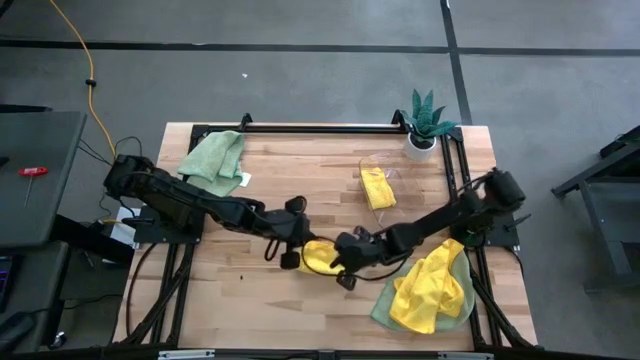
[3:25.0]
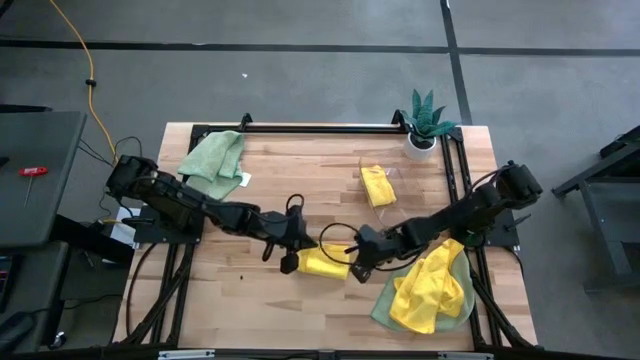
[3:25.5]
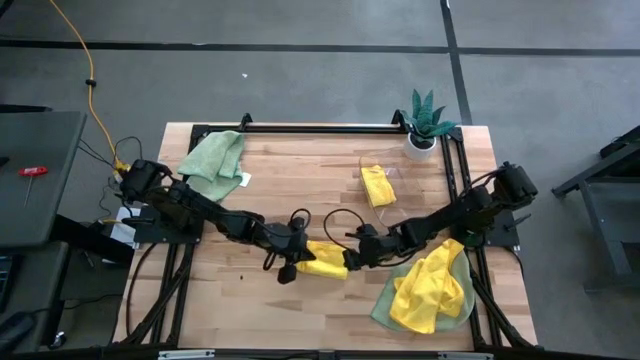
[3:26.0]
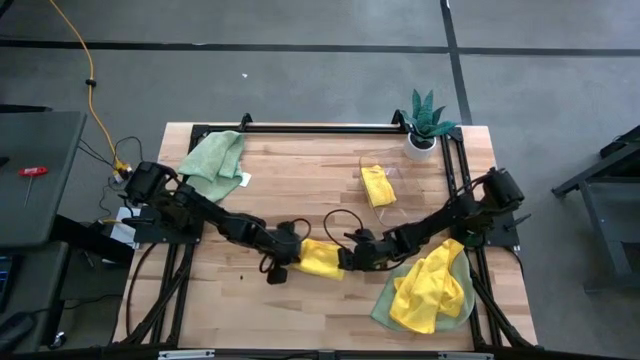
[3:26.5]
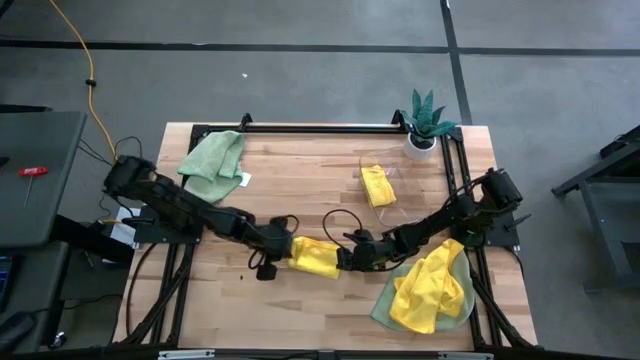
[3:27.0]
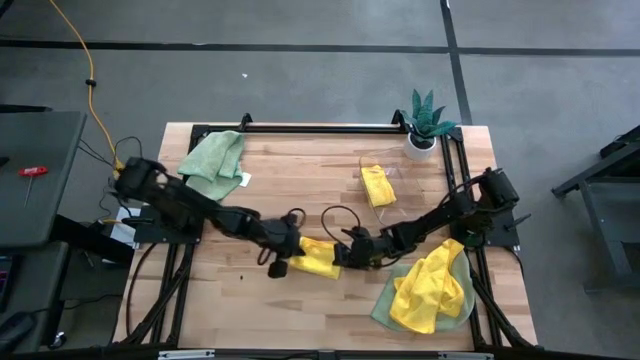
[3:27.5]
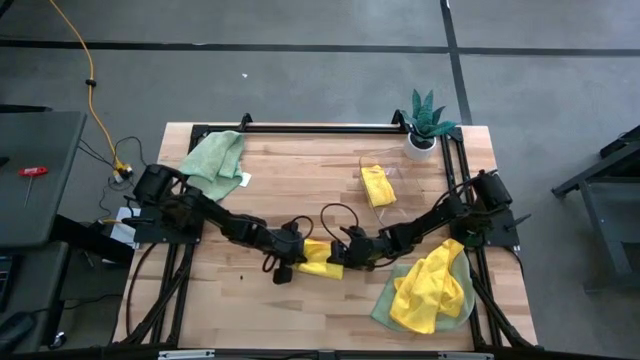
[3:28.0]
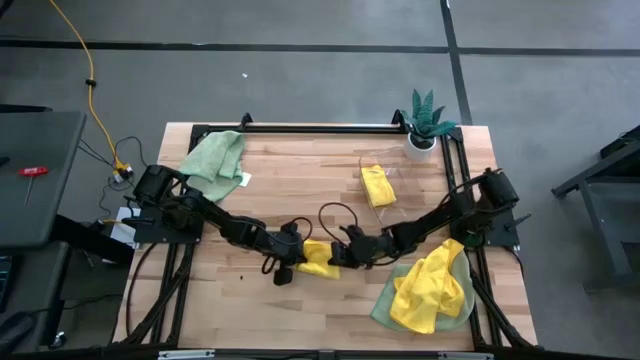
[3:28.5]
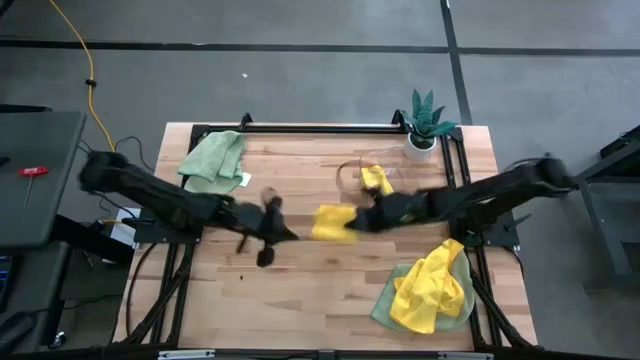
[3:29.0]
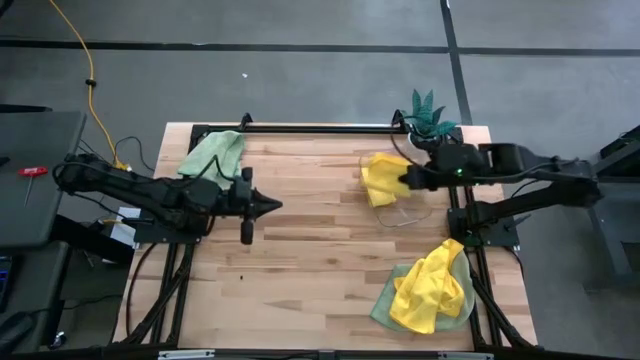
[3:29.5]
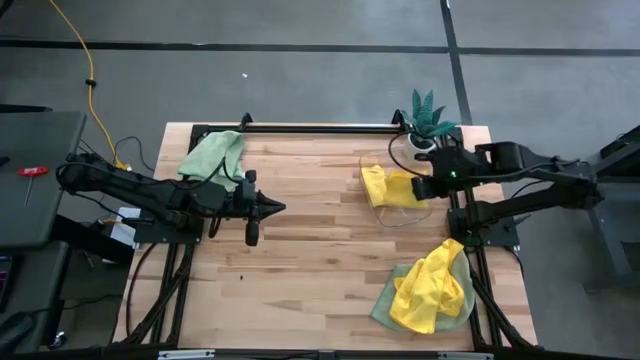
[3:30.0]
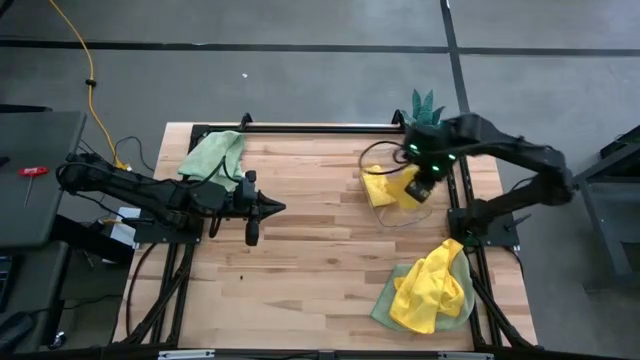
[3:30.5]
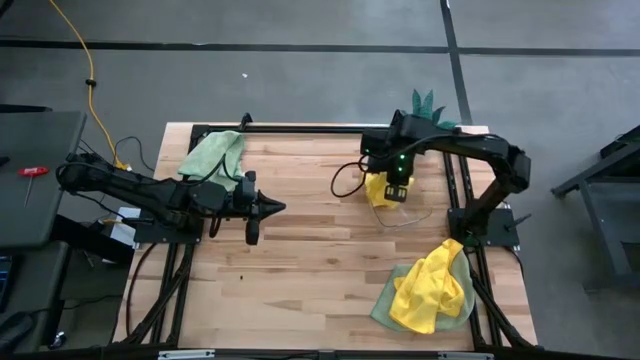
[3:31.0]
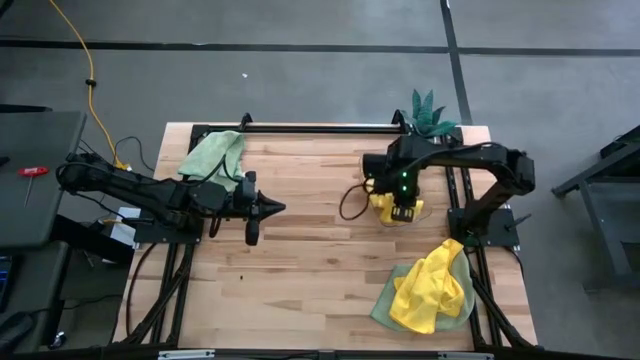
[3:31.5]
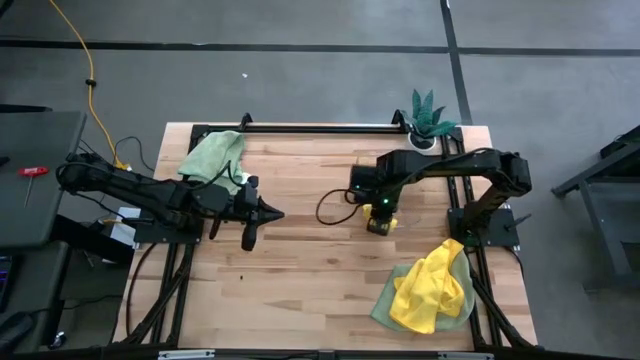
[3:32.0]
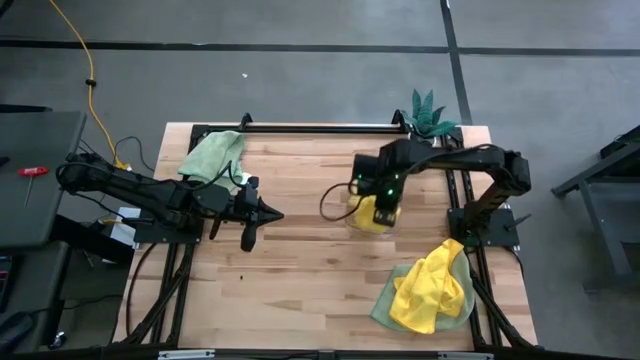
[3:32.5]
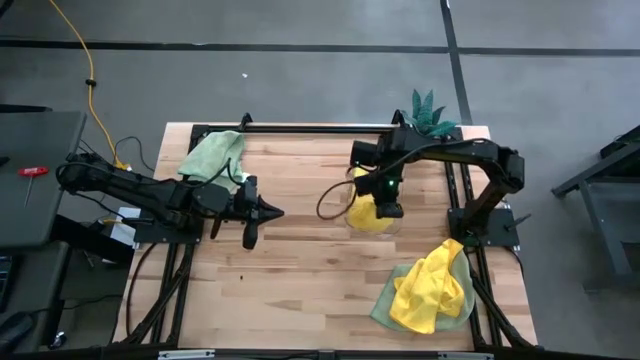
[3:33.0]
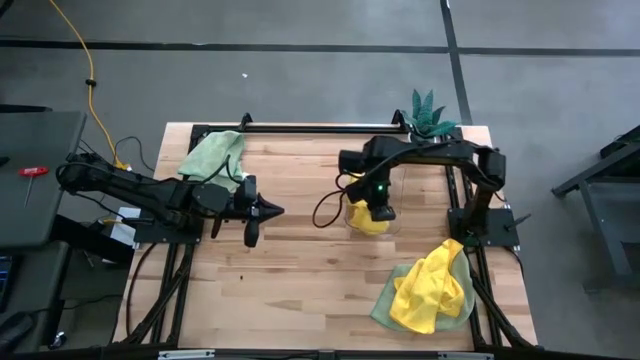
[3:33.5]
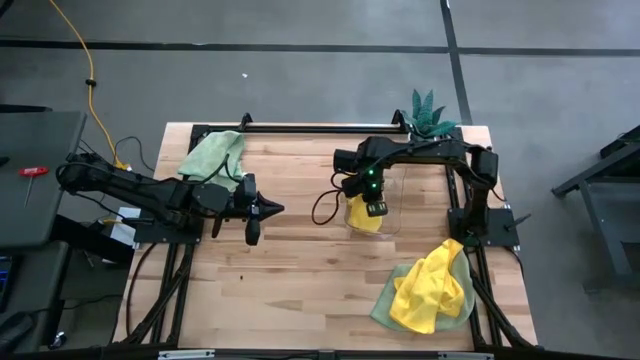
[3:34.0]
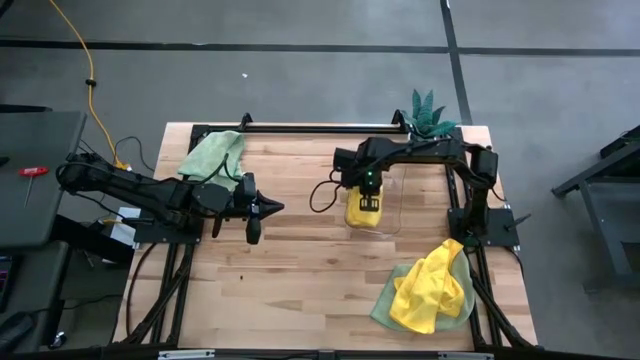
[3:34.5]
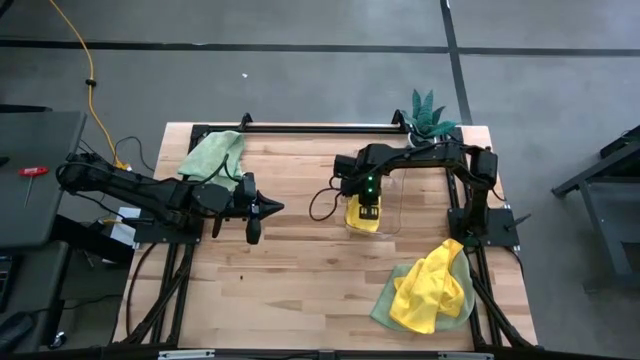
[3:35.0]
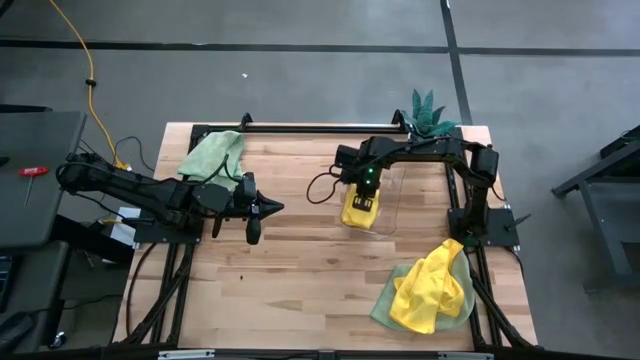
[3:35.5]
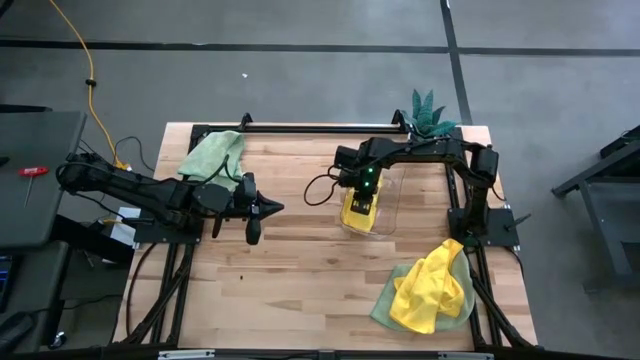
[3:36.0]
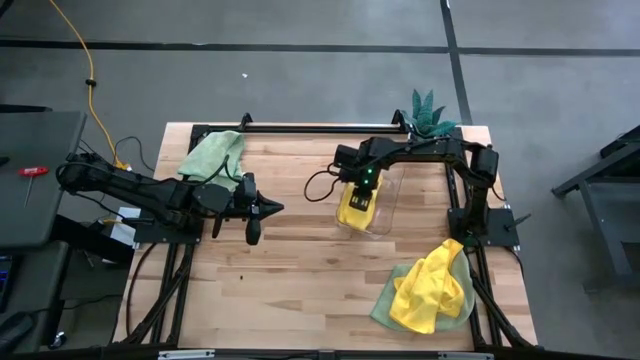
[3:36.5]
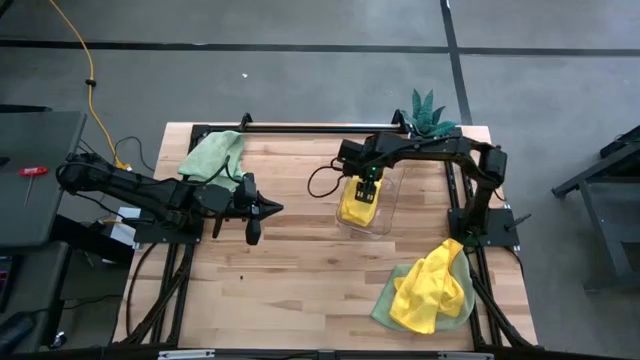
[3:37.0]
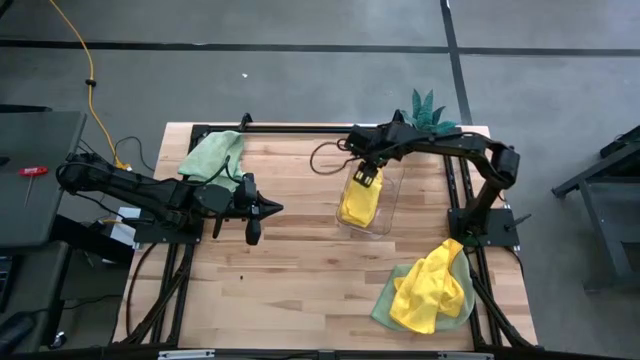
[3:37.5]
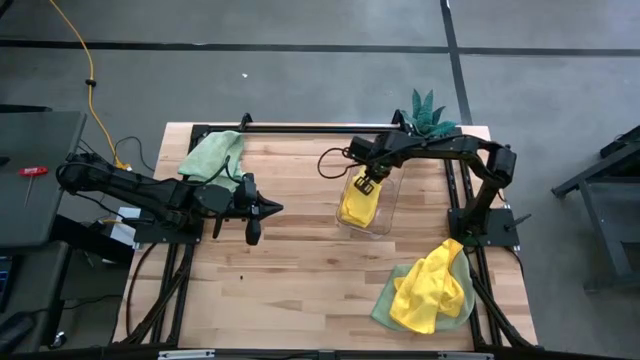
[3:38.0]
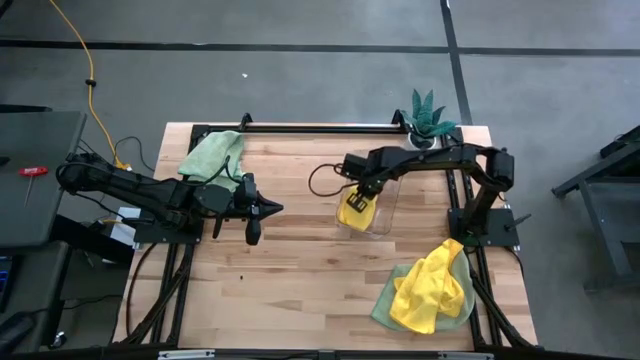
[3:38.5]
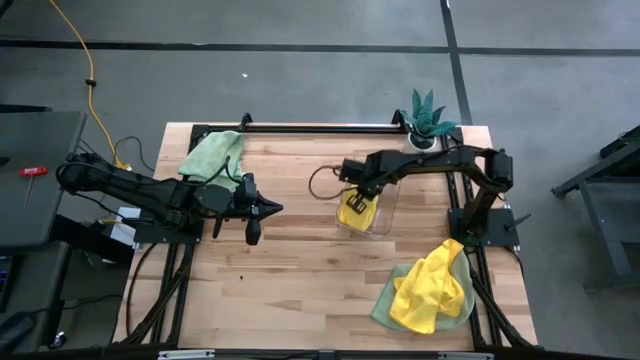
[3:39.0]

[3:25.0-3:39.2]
Task: Fold microfiber towels
Put the folded yellow microfiber towel into the transparent bin

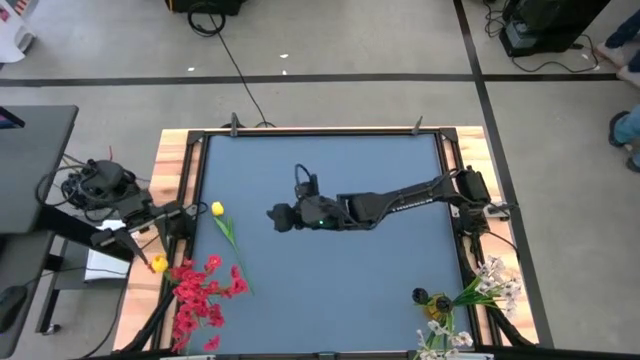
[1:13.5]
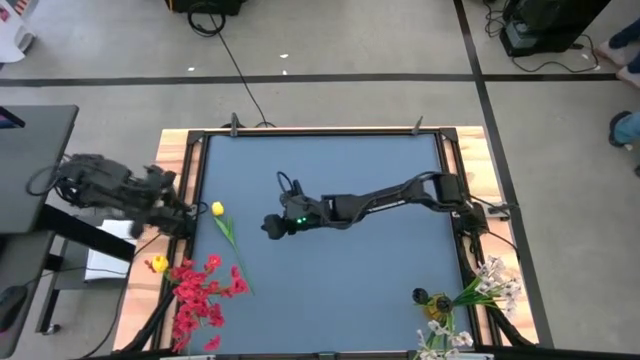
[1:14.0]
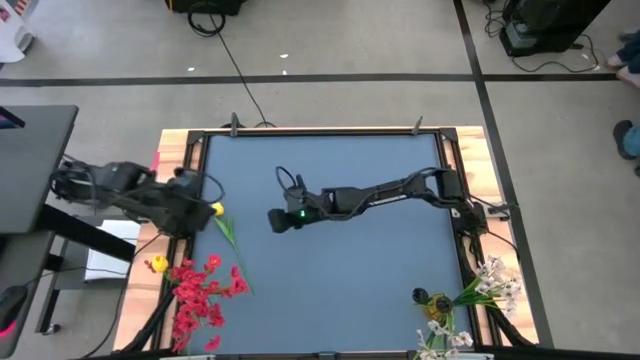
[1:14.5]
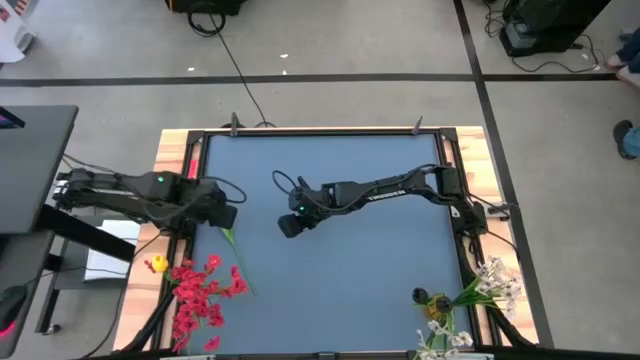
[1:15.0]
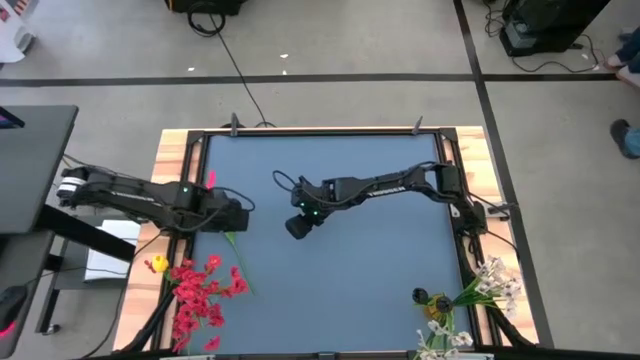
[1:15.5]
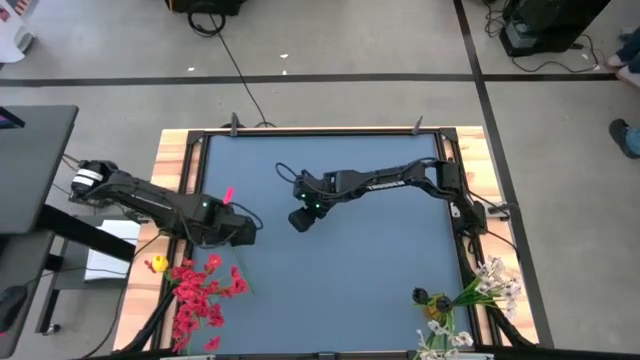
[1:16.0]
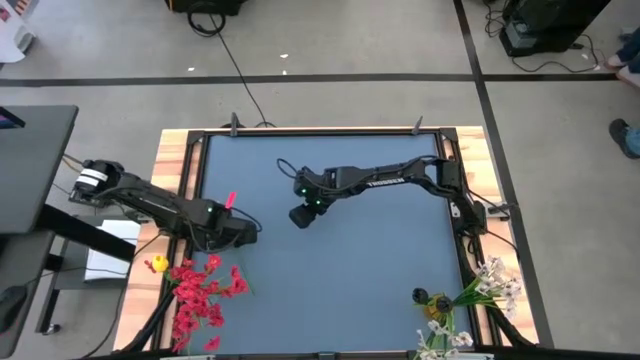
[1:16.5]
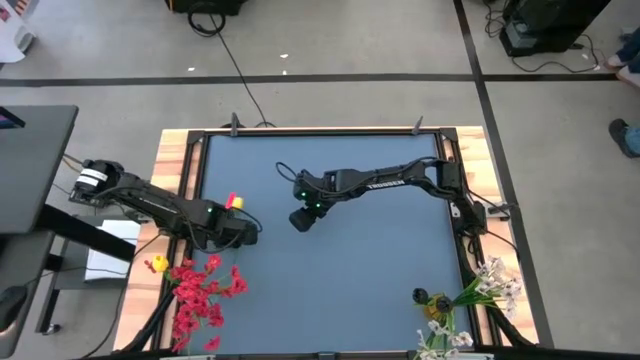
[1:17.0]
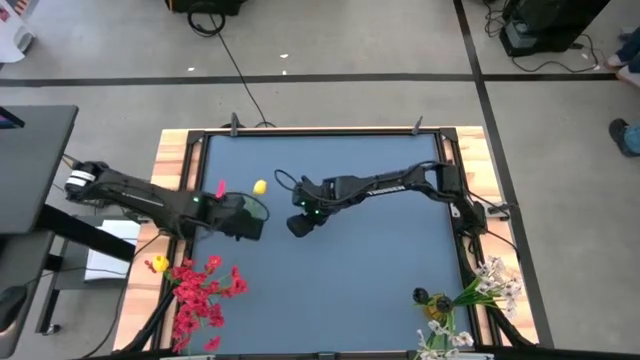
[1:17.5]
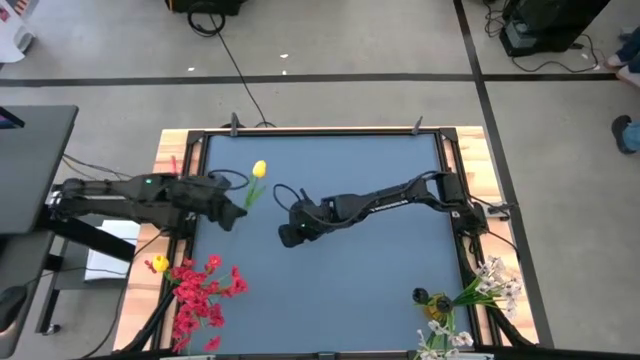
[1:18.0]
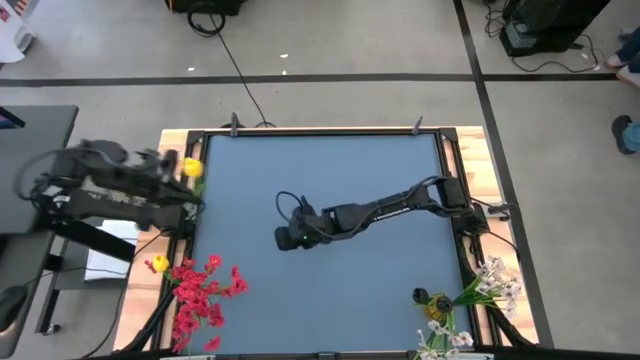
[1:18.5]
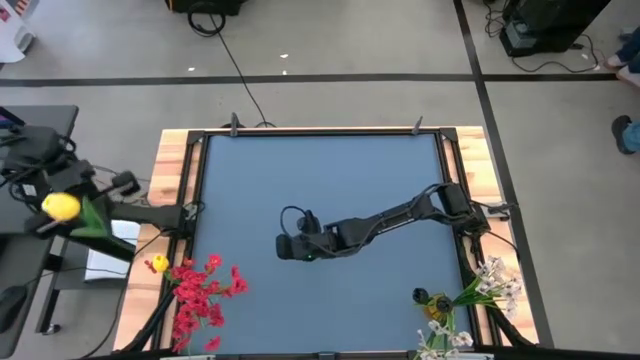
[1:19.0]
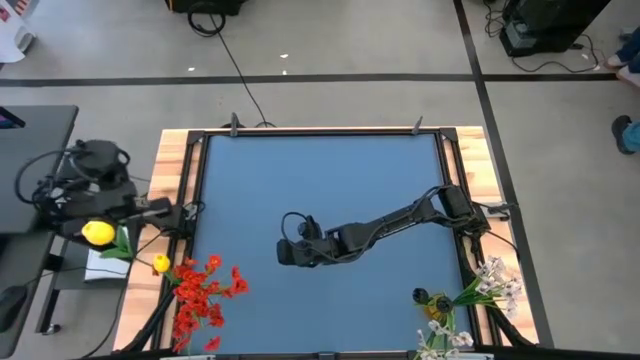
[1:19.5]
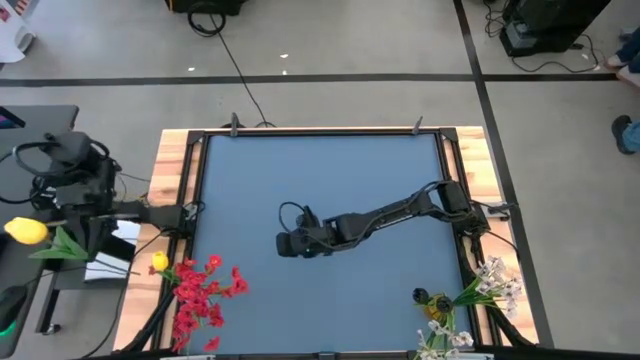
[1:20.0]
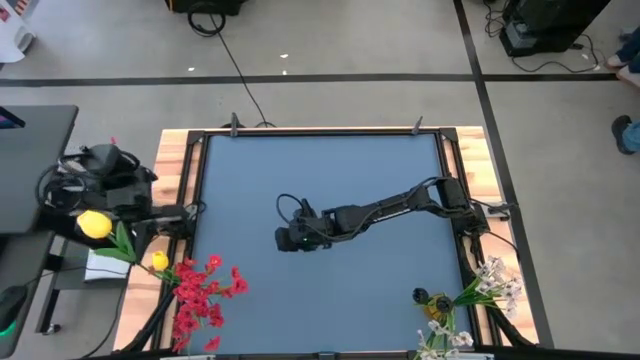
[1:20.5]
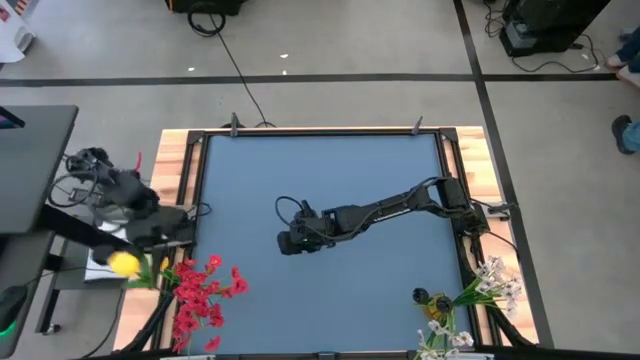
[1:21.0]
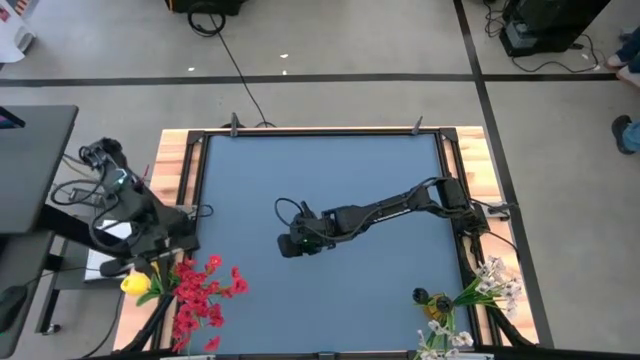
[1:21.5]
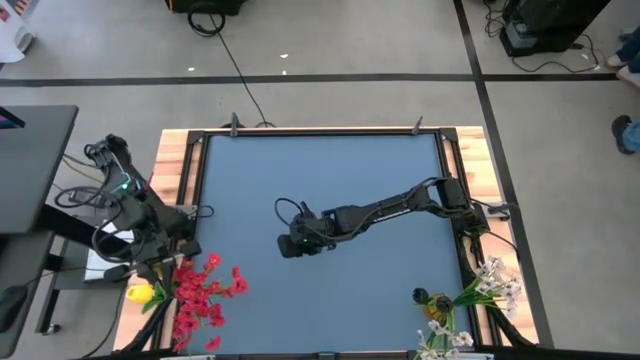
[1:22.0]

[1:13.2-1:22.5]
Task: Sort flowers into vase by color
Put the yellow flower into the transparent flower vase
